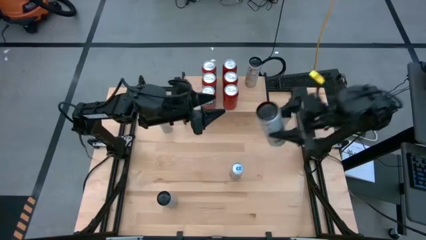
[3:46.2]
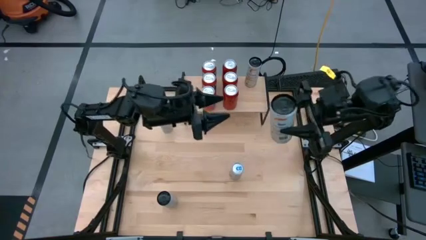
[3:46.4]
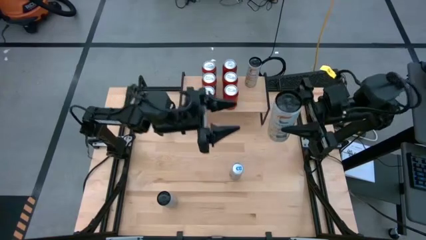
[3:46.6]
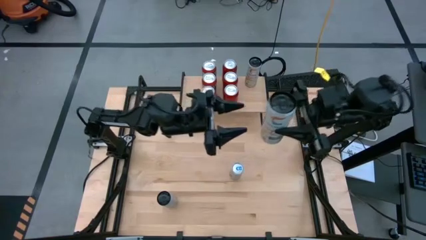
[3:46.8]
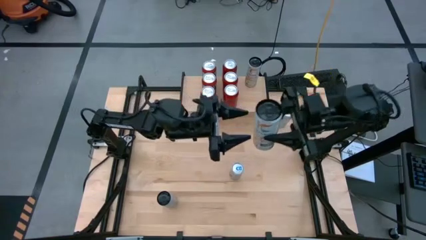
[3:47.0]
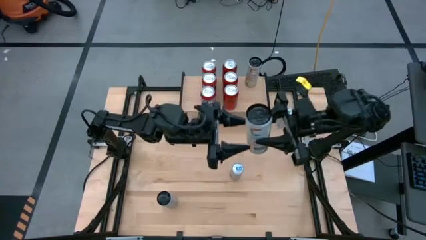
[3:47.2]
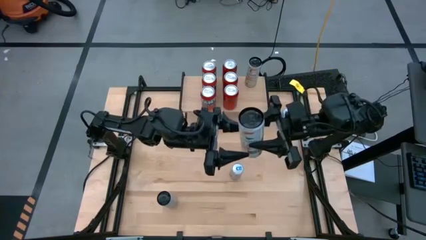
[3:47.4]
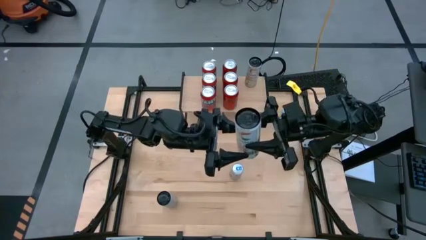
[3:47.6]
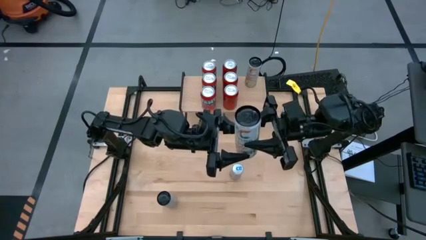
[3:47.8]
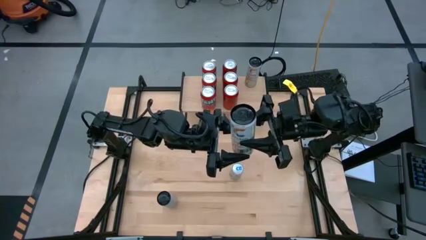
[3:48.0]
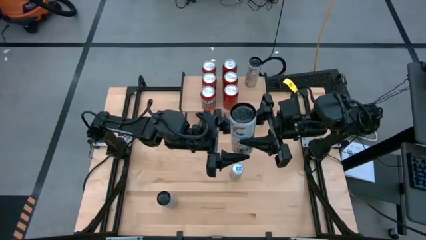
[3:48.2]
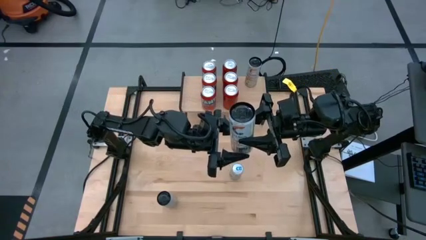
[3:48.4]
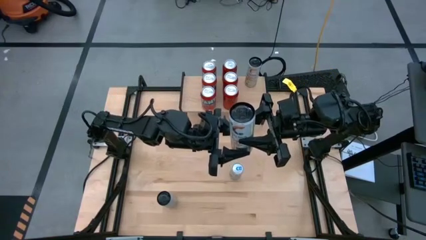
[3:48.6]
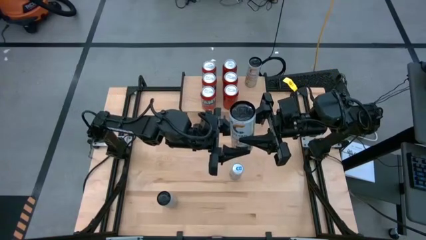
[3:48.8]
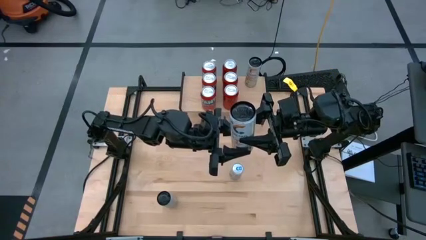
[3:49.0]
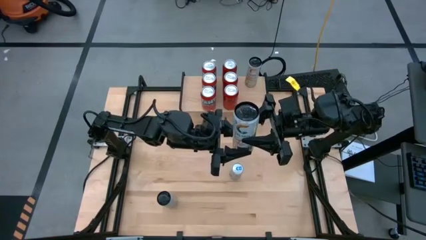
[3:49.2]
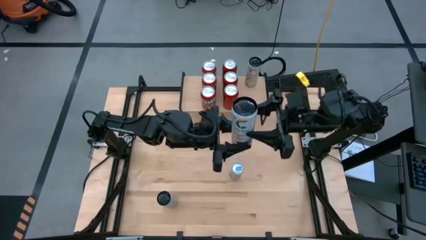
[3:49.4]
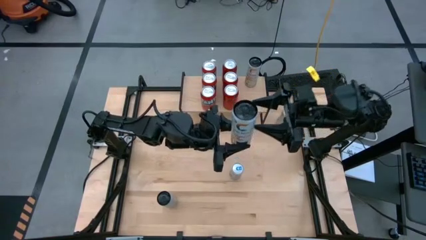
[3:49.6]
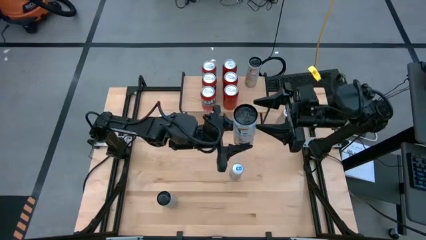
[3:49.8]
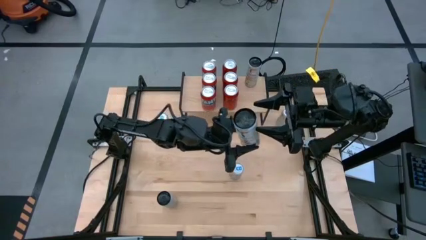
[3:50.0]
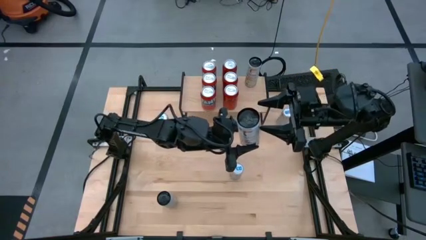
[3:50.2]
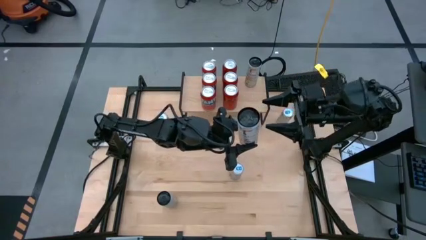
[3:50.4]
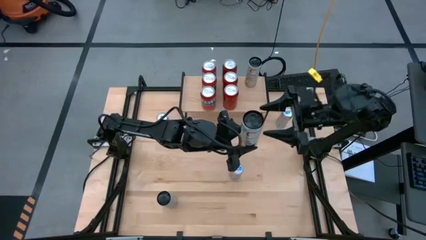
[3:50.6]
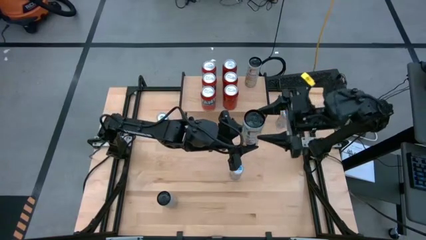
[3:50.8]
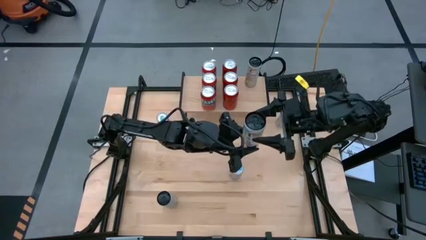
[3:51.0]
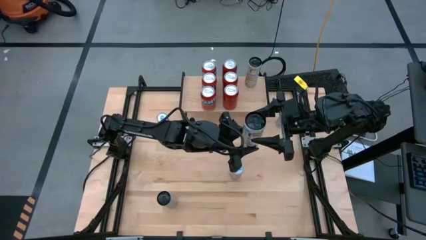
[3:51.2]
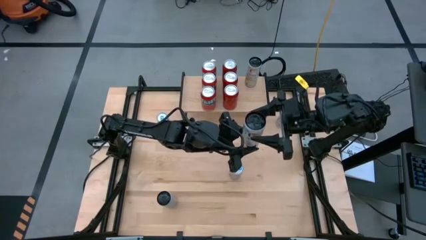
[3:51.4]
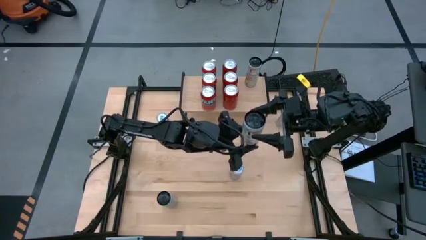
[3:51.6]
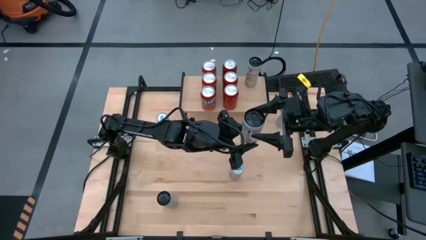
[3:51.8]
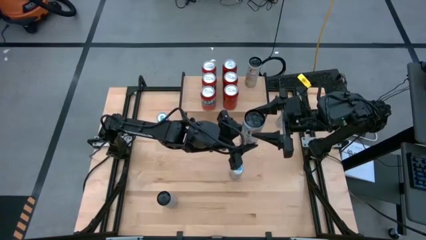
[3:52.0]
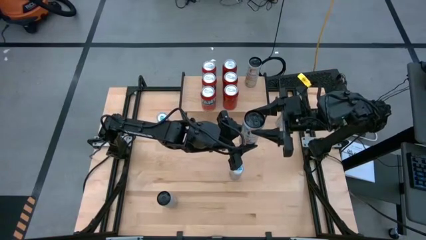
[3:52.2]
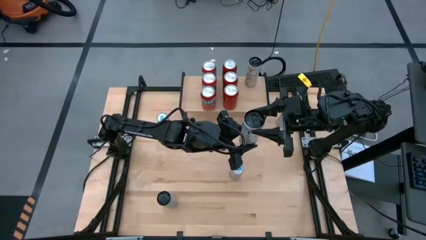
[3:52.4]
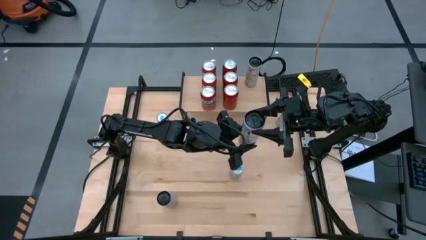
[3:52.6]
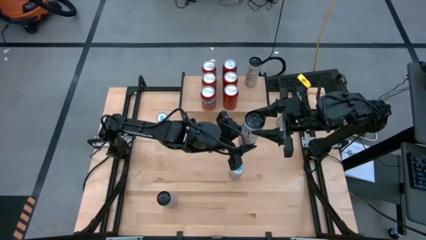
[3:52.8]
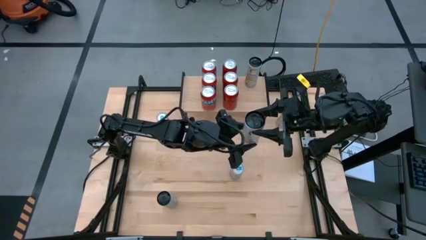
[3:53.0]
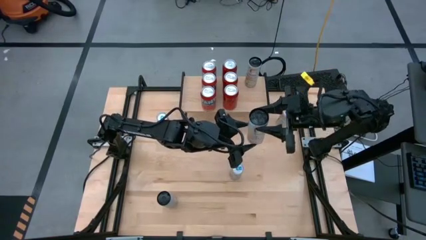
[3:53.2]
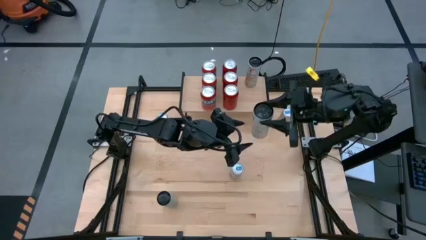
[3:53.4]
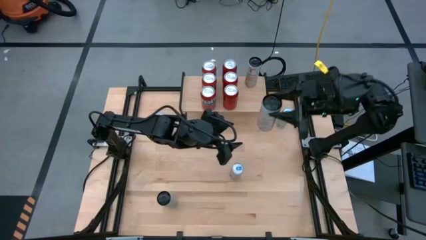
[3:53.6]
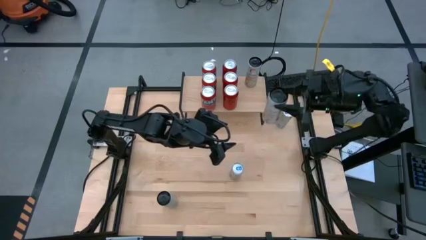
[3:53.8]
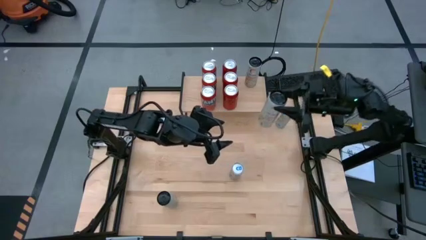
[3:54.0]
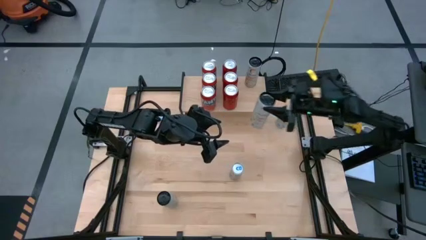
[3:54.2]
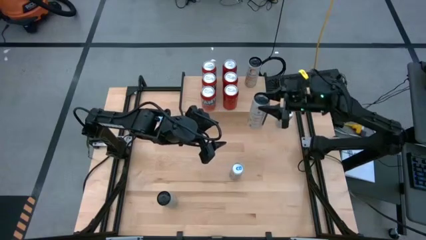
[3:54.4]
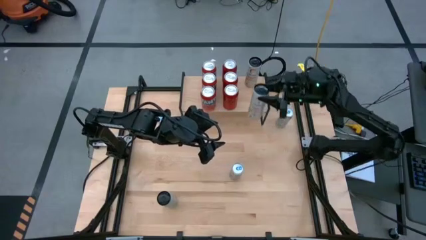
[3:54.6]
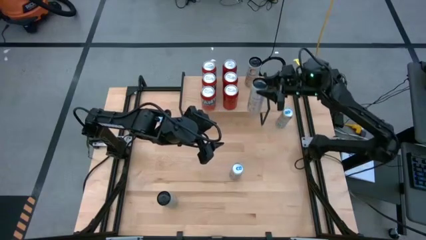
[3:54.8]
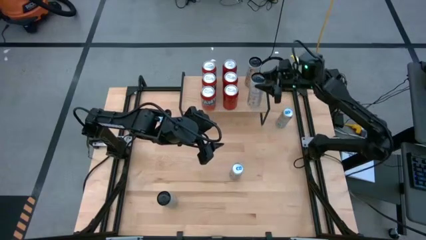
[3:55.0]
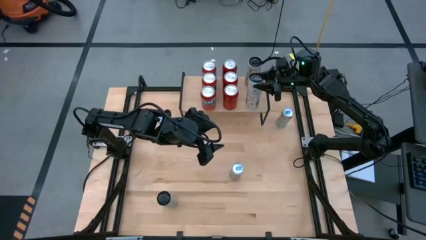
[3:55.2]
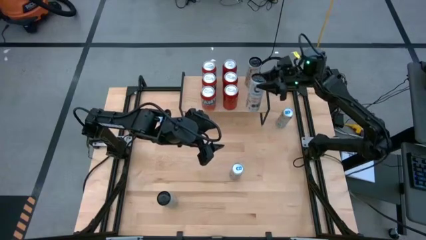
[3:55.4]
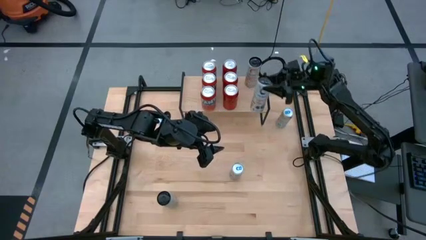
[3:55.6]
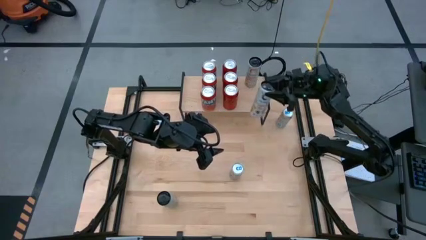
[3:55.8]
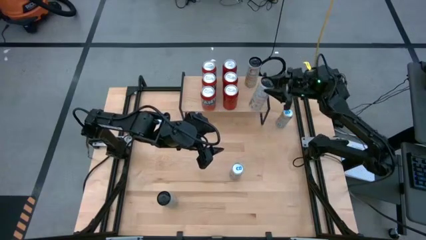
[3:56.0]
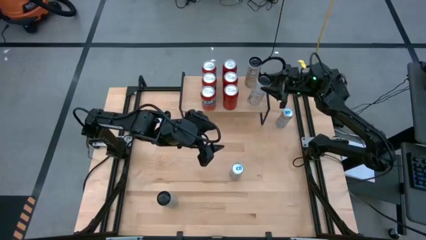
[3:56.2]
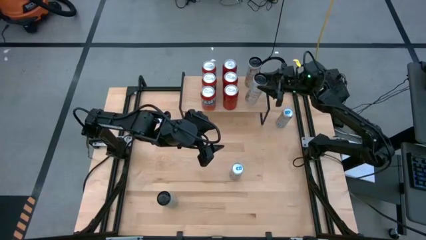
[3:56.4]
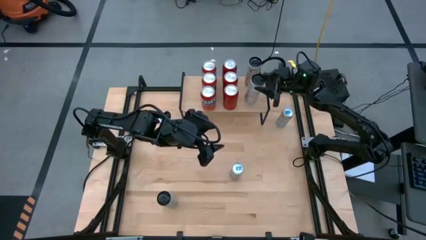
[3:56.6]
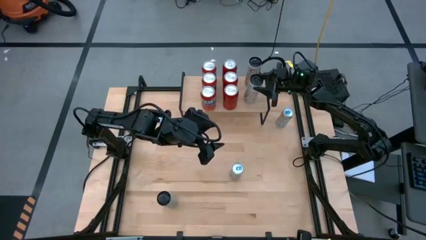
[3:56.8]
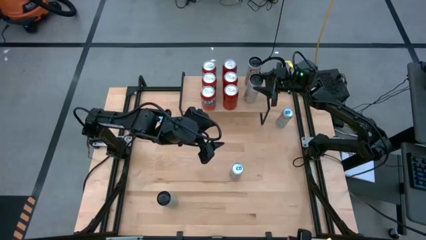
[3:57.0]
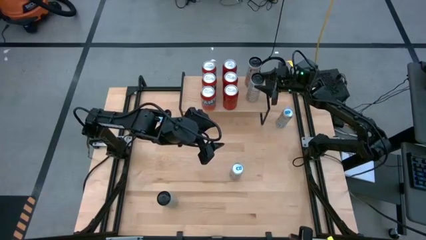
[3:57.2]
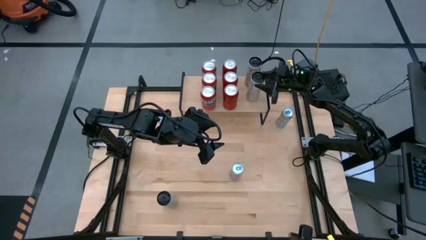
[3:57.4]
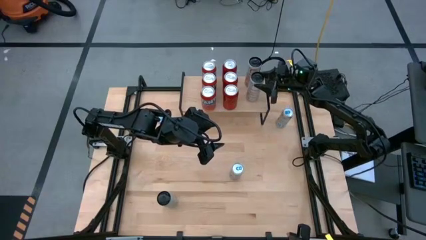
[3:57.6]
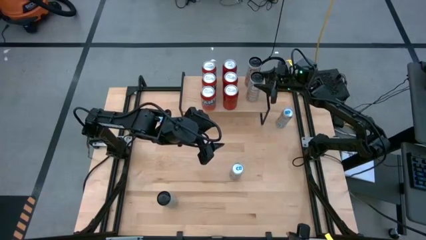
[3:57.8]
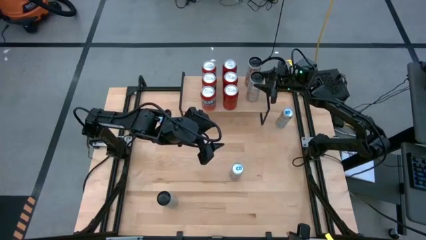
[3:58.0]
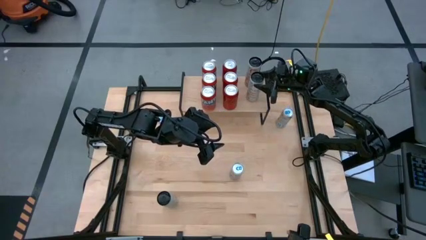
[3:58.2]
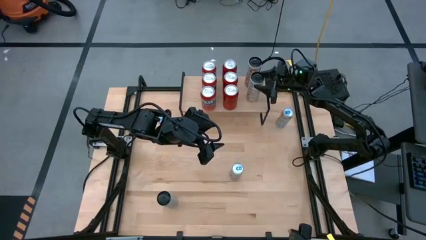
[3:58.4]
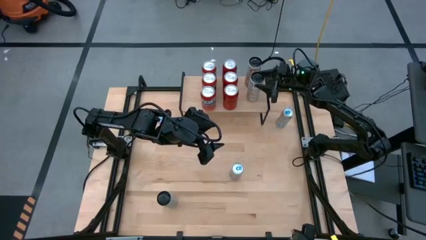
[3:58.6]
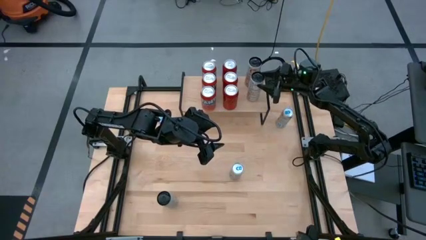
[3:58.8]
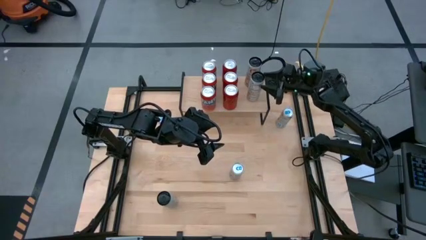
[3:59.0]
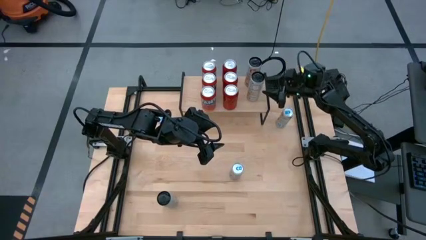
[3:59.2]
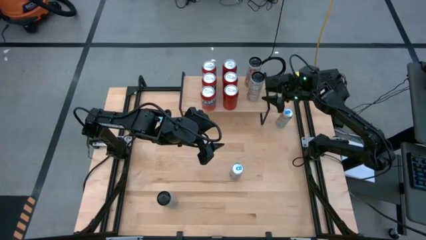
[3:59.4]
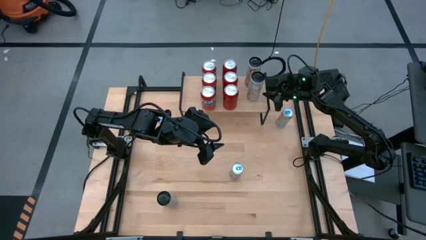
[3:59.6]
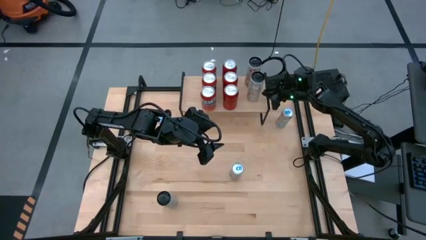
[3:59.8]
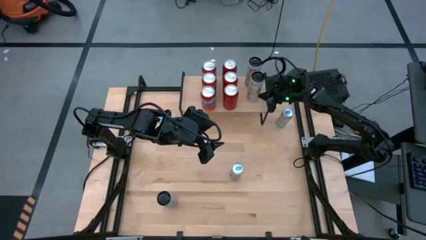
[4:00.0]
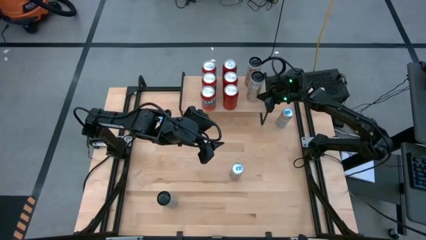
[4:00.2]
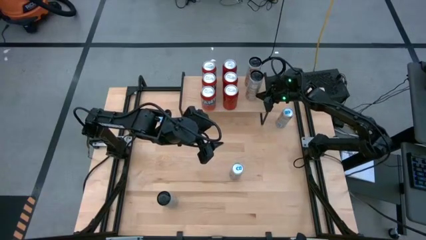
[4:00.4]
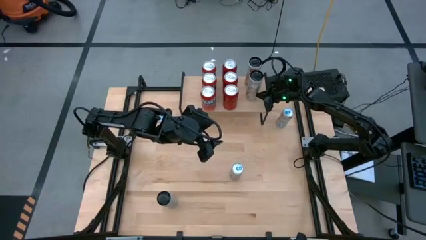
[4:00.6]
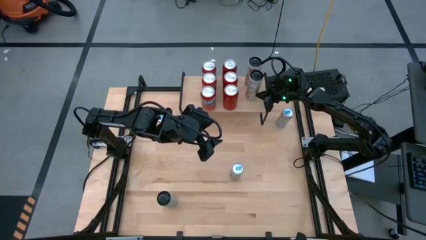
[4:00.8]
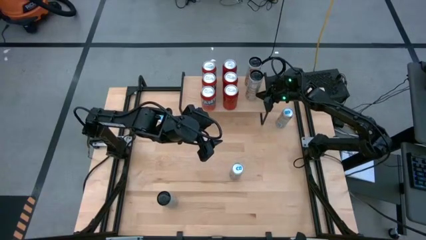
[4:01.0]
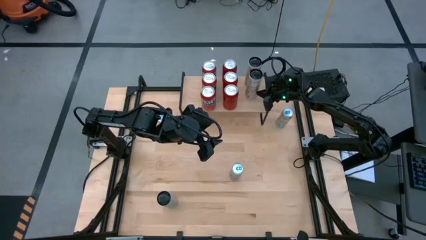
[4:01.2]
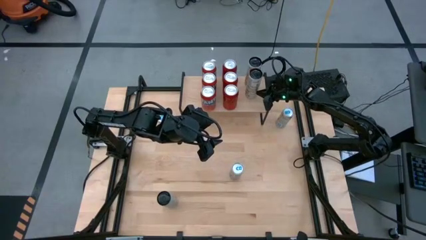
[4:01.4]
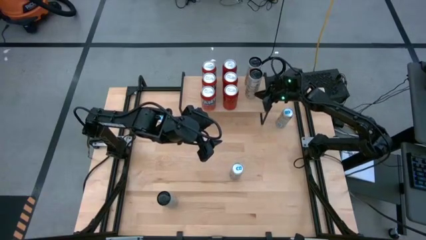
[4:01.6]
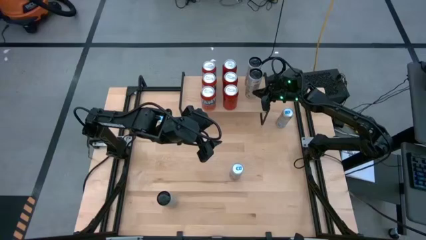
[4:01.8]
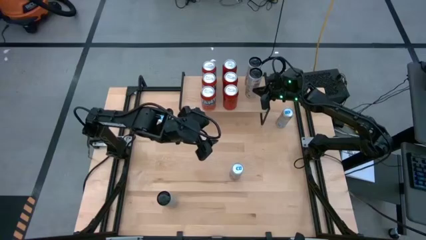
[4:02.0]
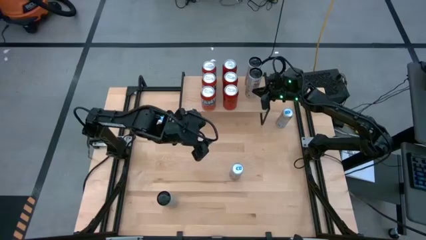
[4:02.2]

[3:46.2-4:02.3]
Task: Place canned beverage on shelf
Put the right white-yellow soda can on the shelf aligned with the other white-yellow soda can

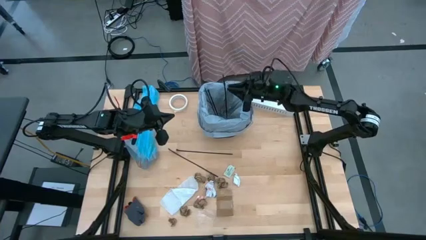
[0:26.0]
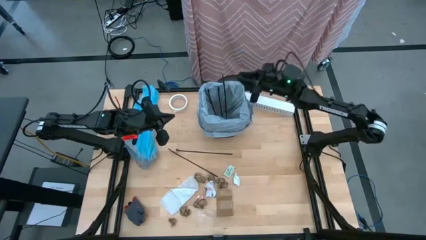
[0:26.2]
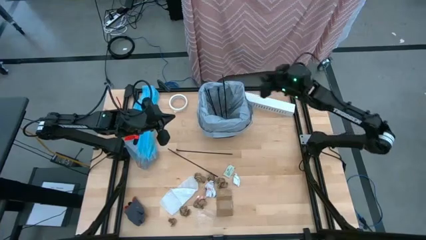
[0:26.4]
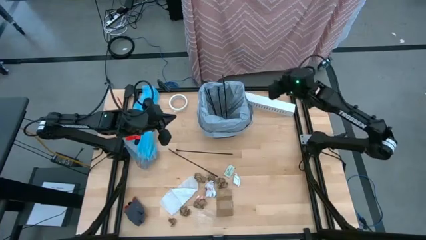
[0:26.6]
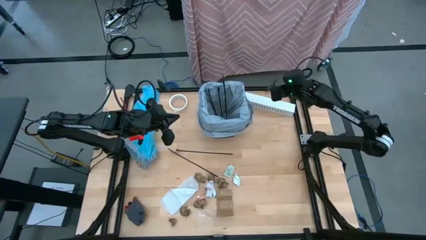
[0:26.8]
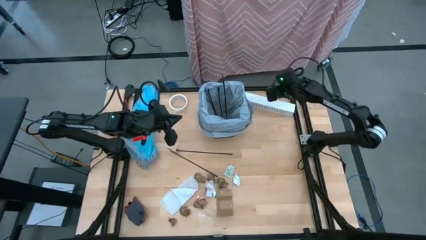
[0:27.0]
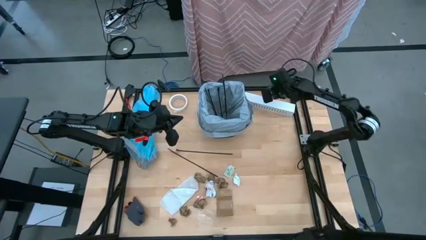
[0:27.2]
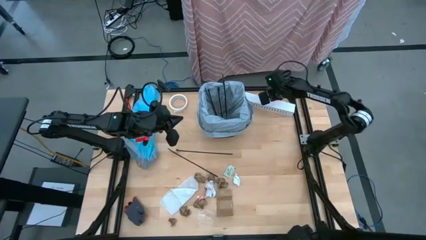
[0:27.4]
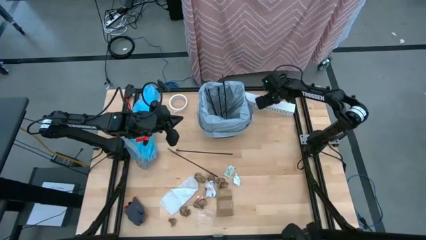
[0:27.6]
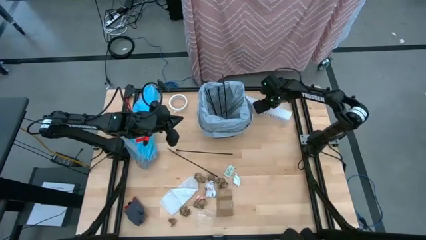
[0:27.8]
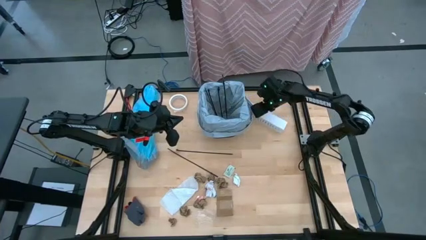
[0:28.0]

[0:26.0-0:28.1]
Task: place trash/remove bag and relplace
Adjust the trash bin on the table
